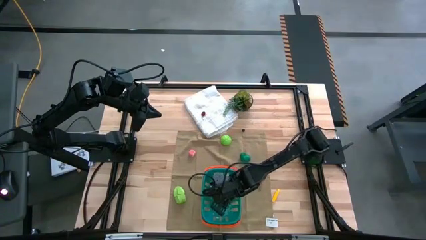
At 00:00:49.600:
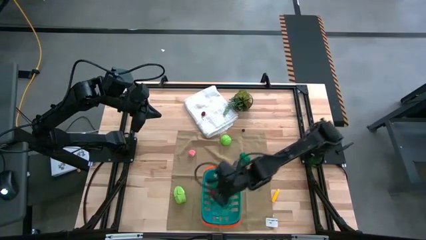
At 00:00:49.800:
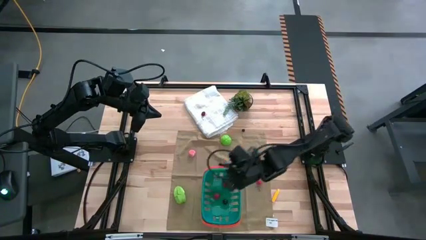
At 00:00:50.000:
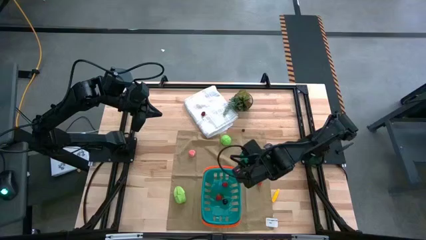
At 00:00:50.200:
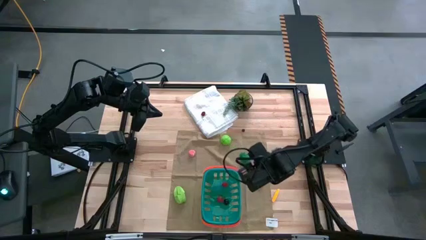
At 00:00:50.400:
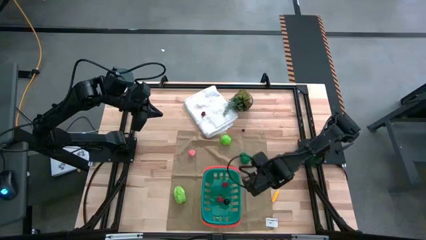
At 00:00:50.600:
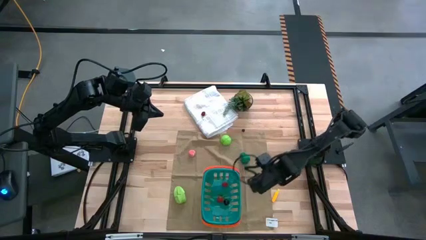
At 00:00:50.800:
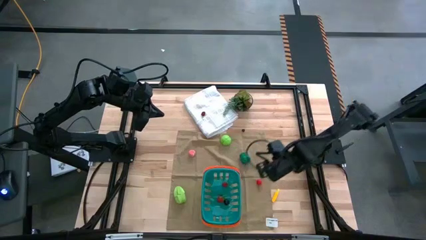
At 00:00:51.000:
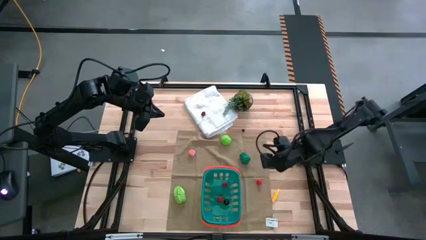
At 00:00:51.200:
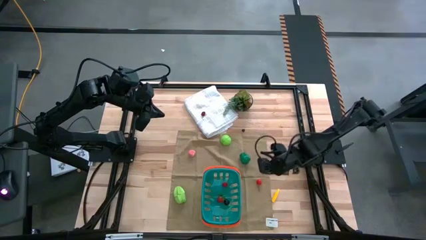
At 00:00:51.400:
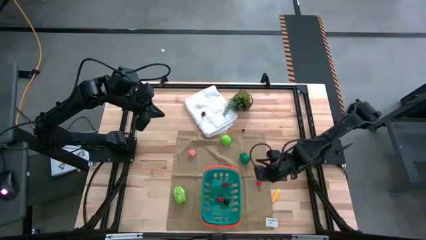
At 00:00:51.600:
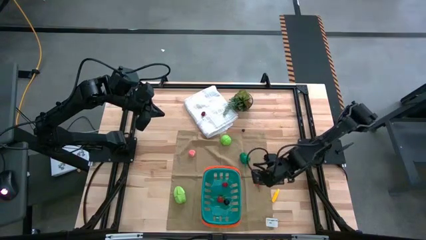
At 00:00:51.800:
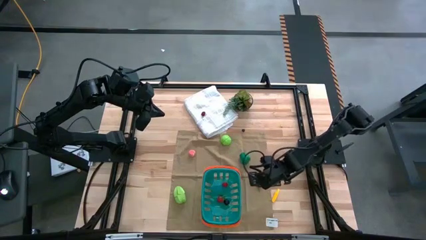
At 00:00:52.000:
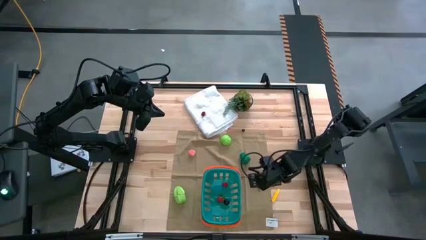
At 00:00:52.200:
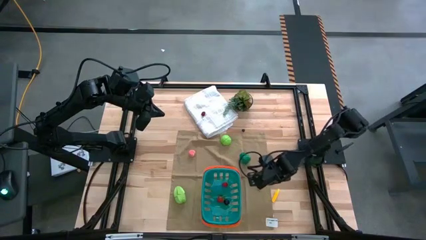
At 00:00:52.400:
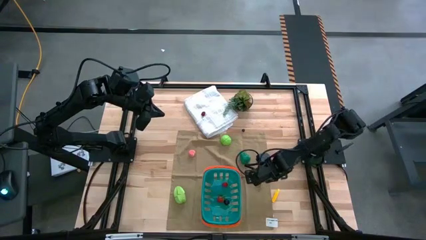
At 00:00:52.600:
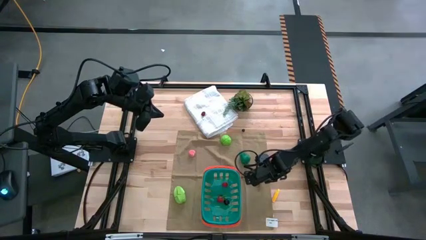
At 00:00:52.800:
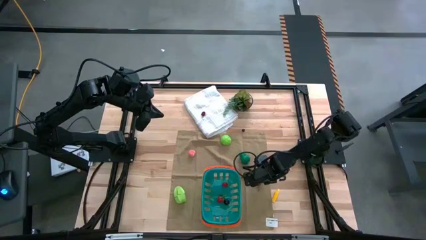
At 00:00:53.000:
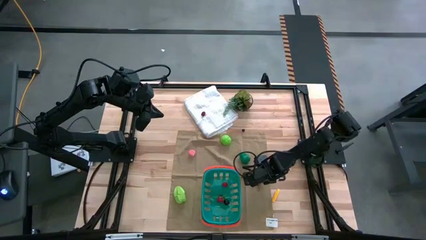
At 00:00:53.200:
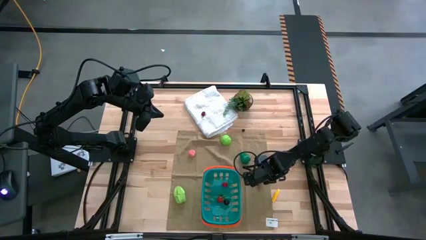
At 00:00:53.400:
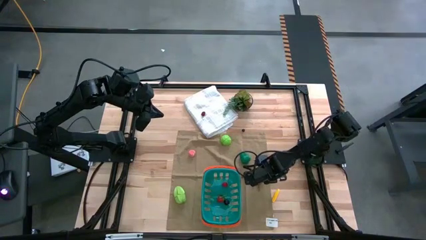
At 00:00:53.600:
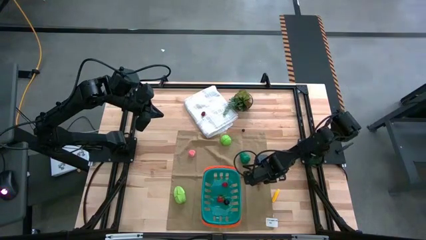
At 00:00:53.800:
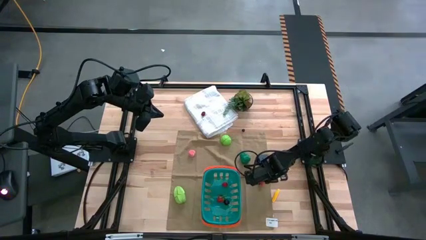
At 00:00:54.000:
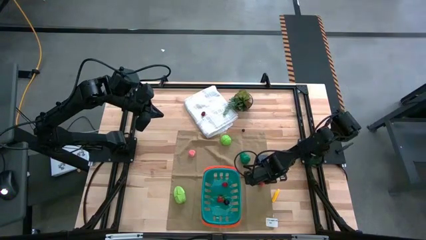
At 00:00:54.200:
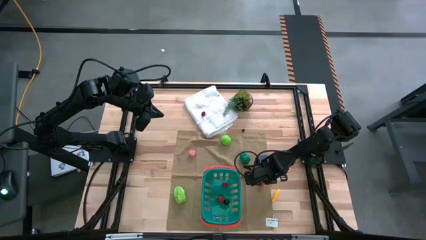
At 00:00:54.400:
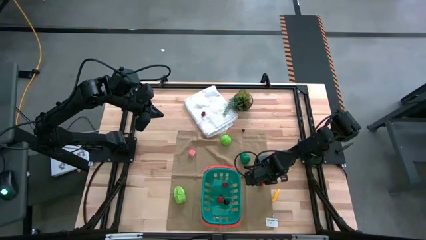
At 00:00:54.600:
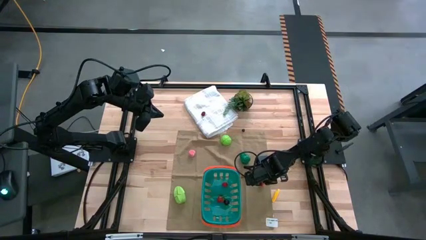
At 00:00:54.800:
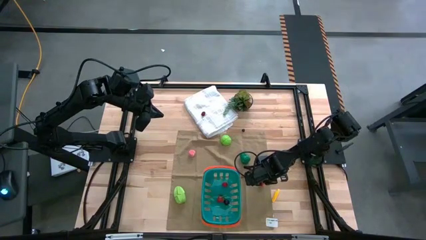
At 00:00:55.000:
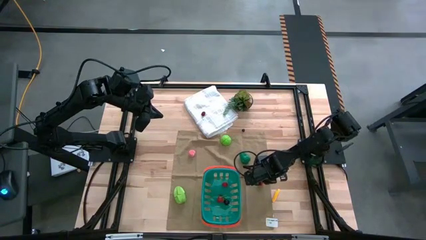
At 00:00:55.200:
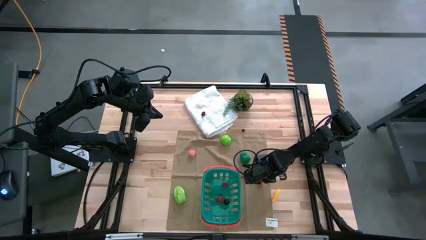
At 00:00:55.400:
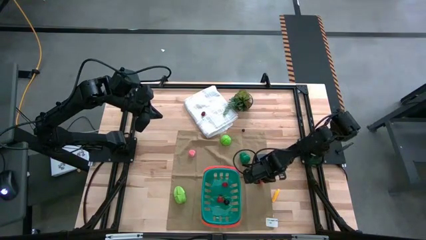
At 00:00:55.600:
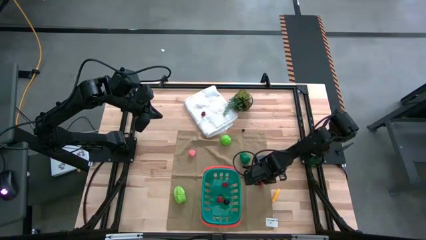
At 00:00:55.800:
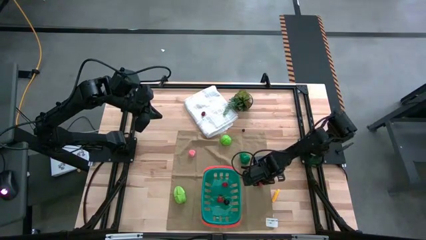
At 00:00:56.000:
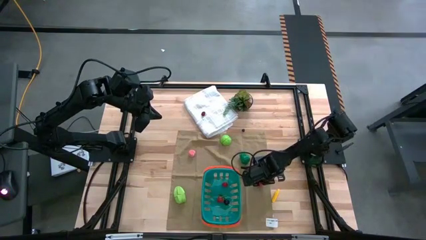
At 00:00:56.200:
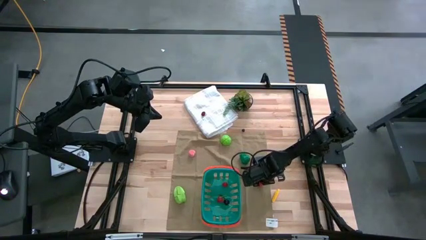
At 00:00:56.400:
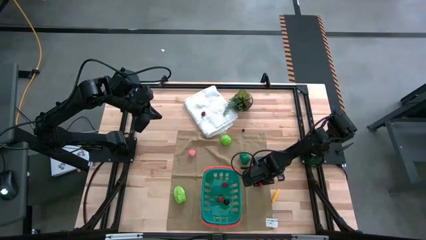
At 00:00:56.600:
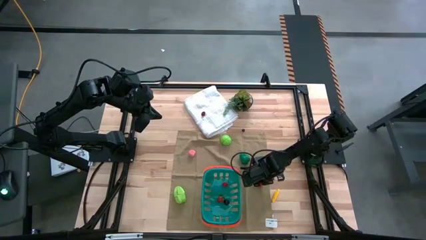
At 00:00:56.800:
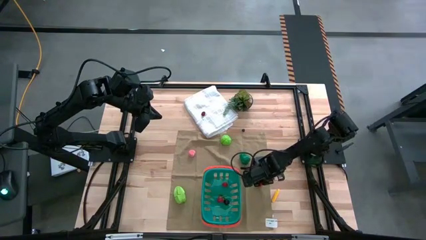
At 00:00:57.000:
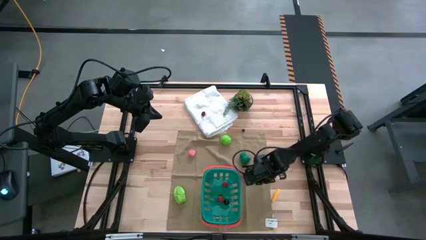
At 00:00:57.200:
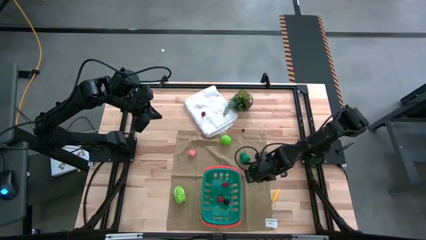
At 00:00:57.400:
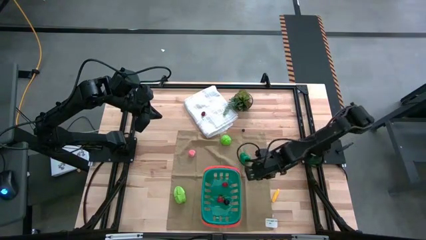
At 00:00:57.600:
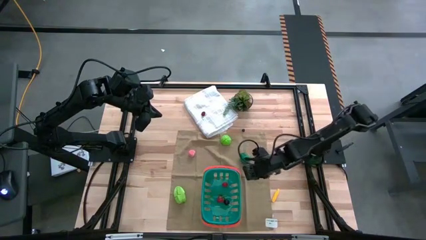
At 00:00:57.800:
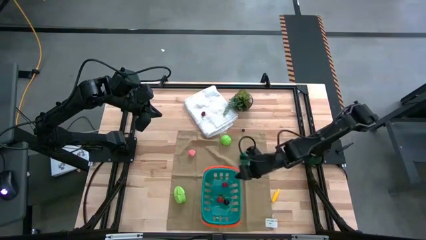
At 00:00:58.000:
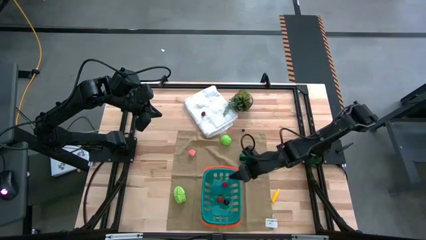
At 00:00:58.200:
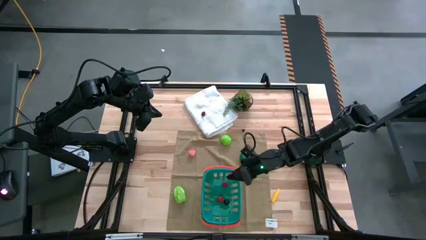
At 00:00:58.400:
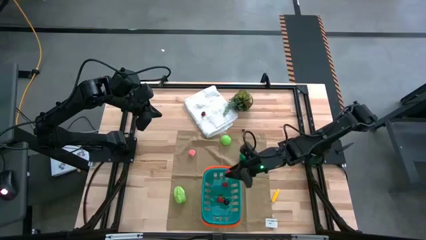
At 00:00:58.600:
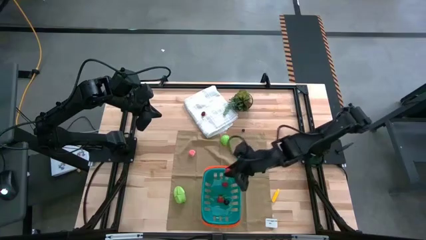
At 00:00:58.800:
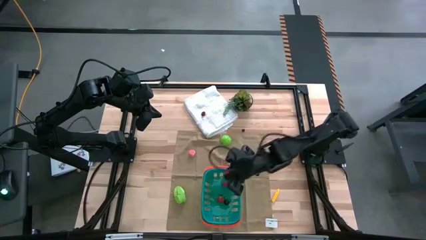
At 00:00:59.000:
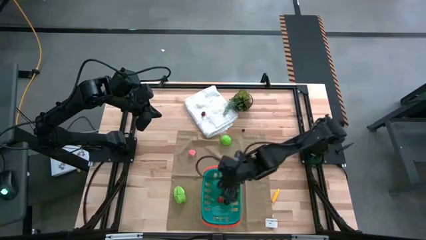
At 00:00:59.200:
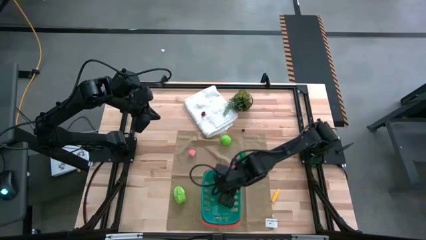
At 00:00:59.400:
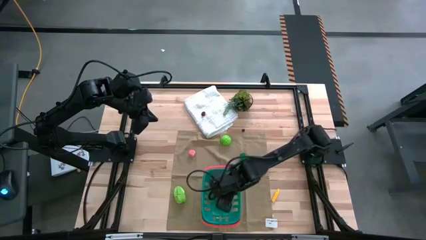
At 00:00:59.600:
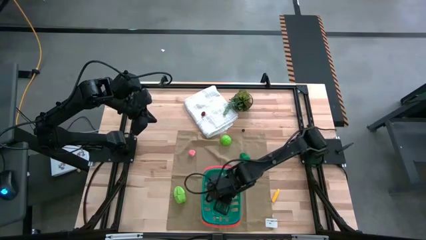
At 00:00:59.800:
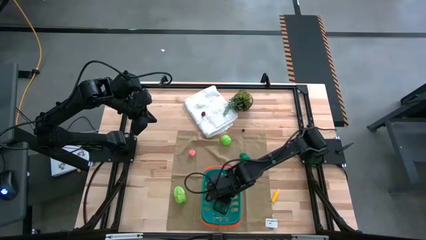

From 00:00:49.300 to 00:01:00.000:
Task: Pick and placing Produce into tupperware
Put the bottom red cherry into the blue bin
